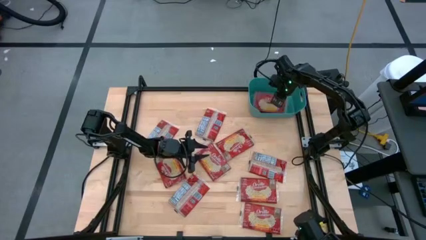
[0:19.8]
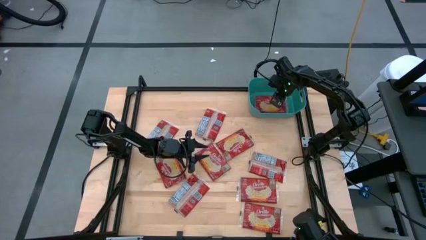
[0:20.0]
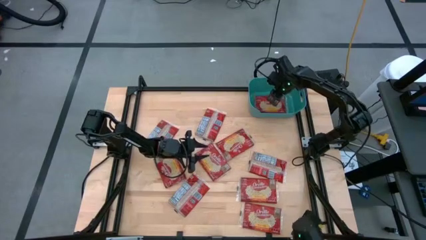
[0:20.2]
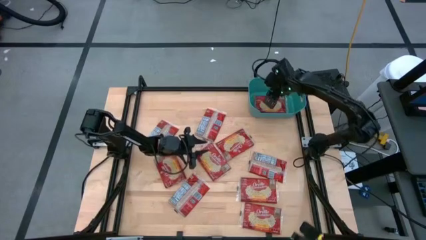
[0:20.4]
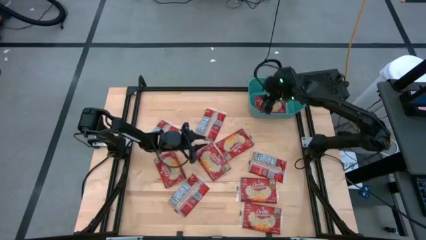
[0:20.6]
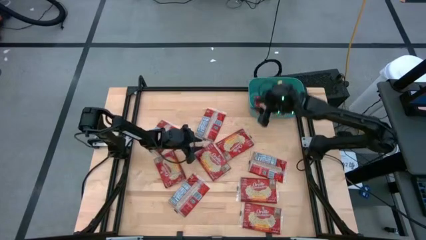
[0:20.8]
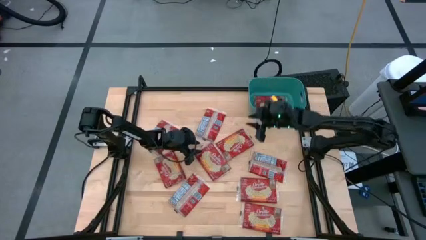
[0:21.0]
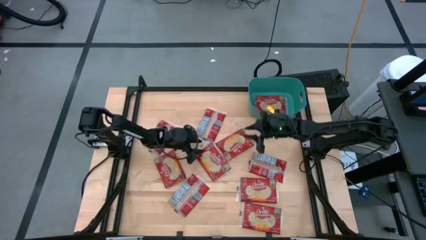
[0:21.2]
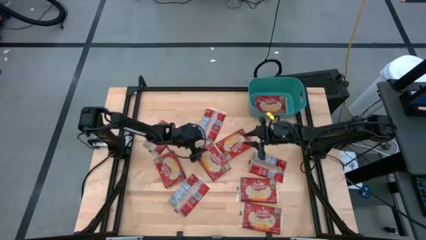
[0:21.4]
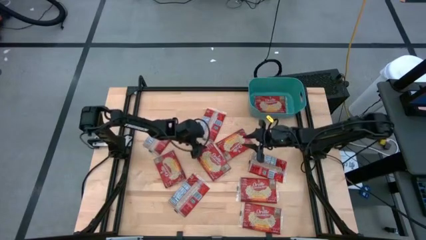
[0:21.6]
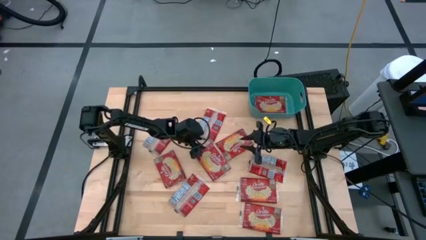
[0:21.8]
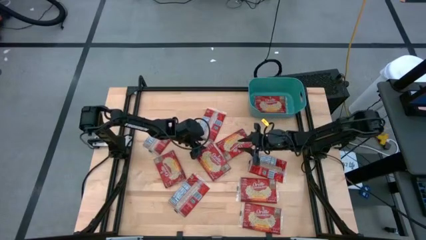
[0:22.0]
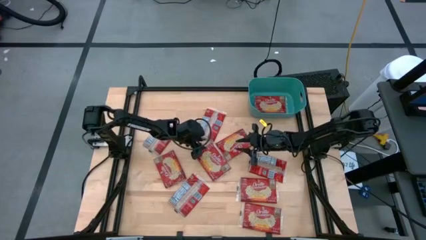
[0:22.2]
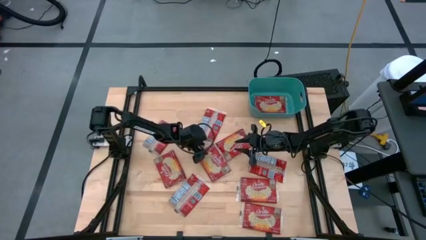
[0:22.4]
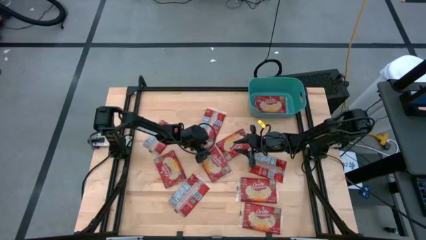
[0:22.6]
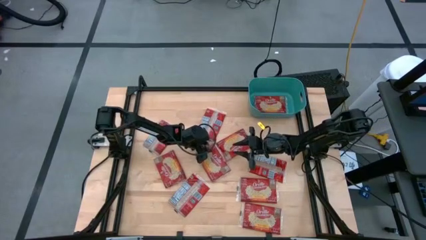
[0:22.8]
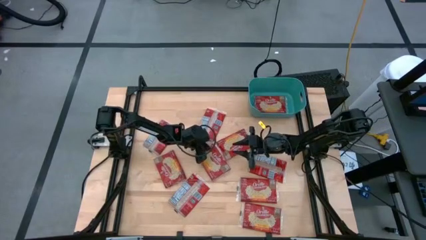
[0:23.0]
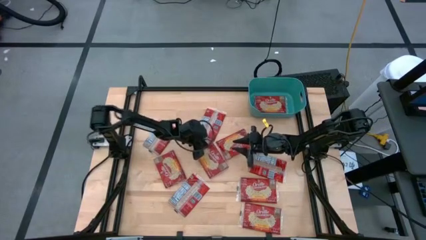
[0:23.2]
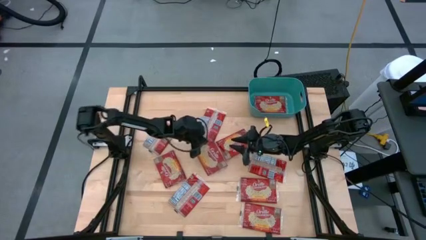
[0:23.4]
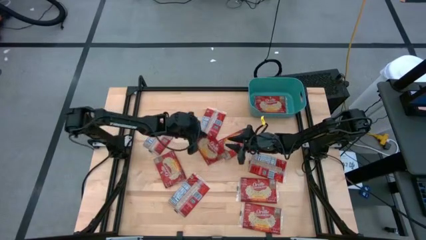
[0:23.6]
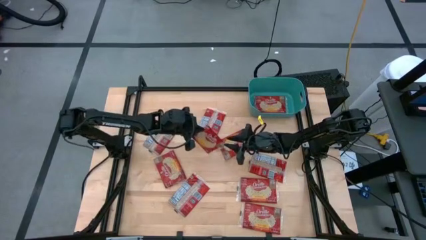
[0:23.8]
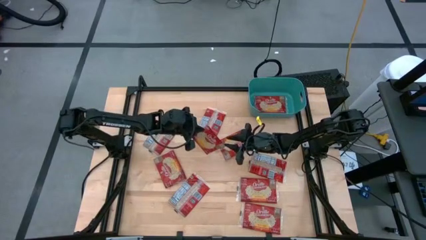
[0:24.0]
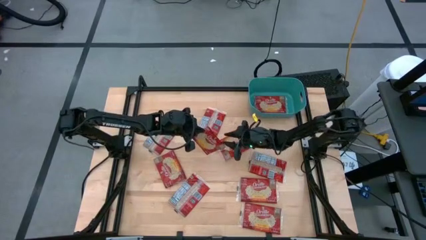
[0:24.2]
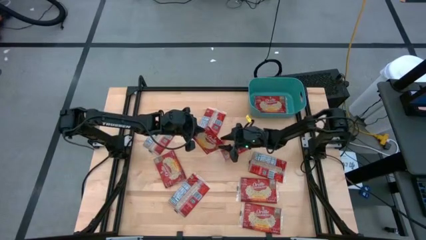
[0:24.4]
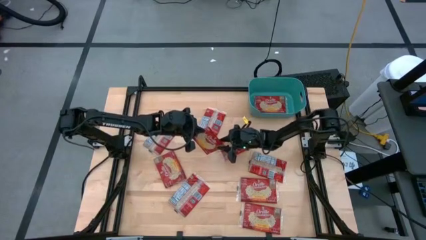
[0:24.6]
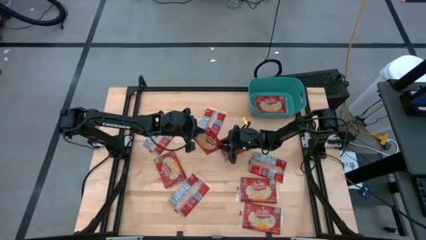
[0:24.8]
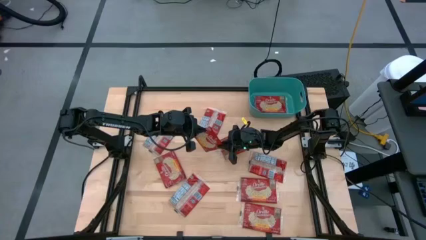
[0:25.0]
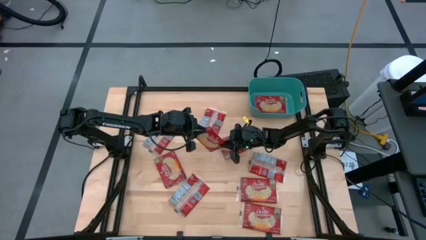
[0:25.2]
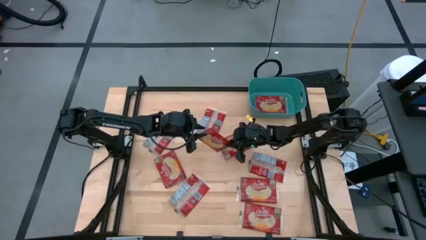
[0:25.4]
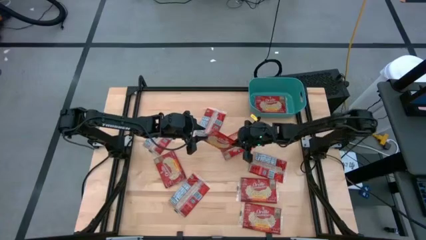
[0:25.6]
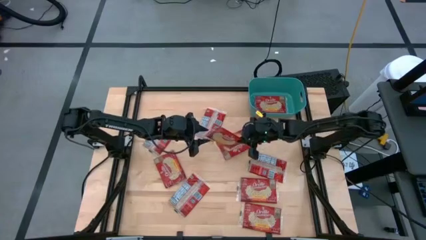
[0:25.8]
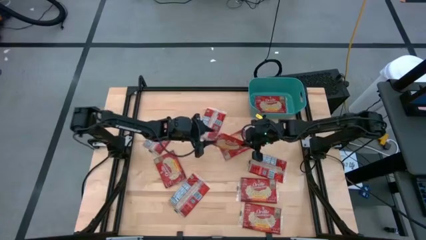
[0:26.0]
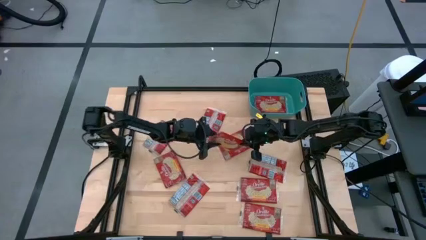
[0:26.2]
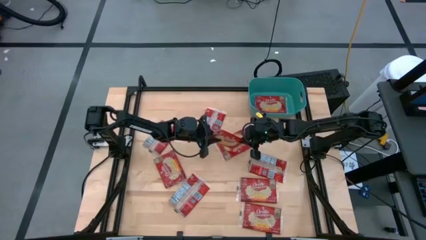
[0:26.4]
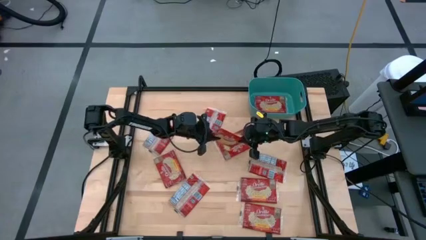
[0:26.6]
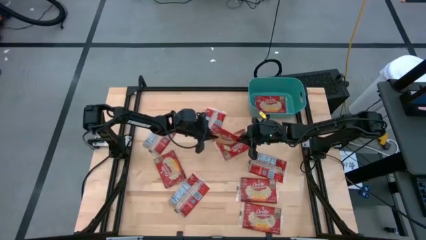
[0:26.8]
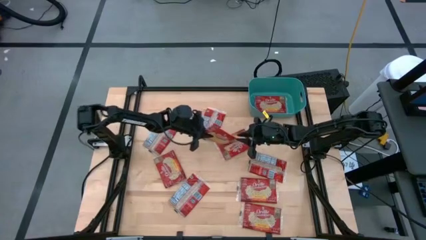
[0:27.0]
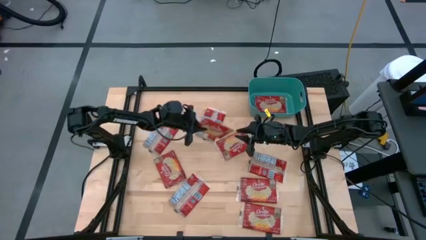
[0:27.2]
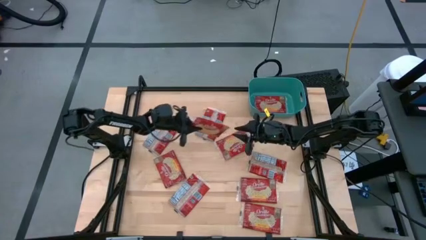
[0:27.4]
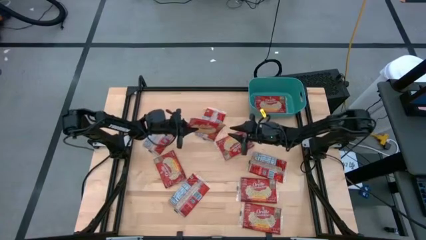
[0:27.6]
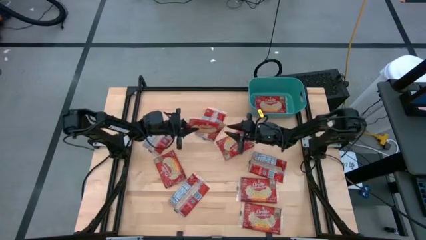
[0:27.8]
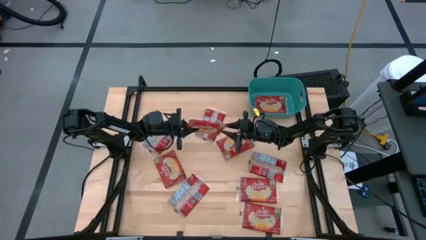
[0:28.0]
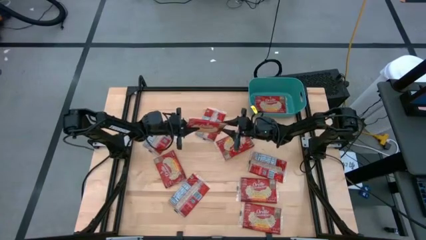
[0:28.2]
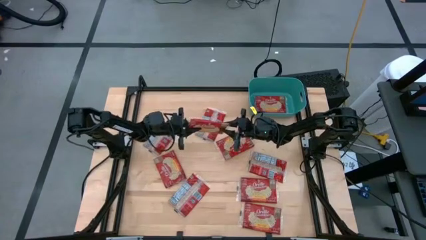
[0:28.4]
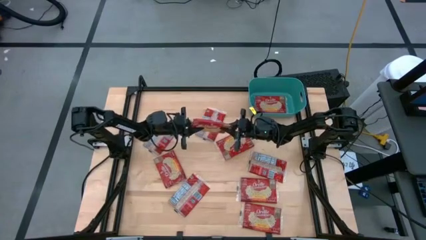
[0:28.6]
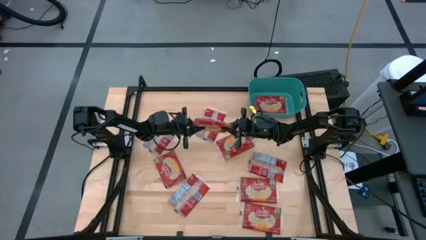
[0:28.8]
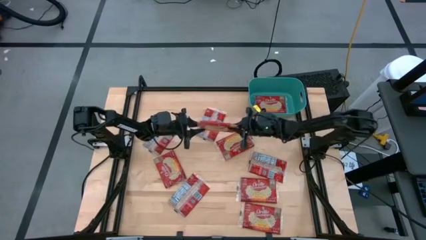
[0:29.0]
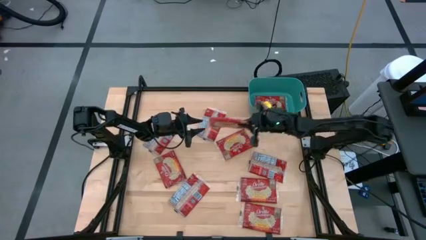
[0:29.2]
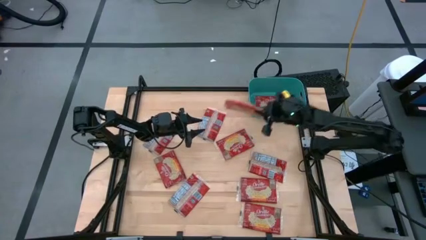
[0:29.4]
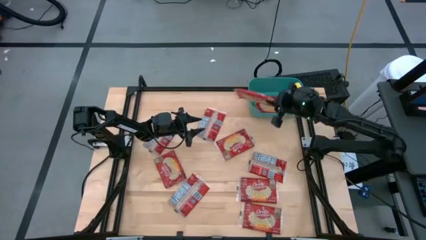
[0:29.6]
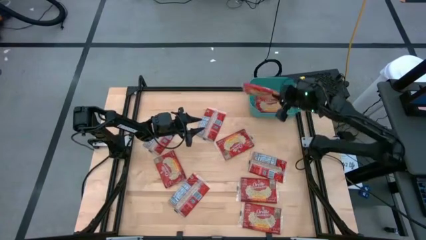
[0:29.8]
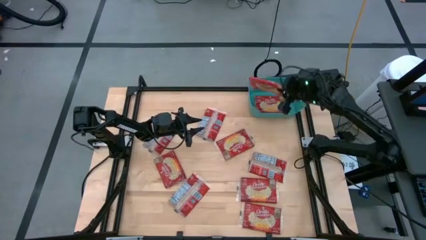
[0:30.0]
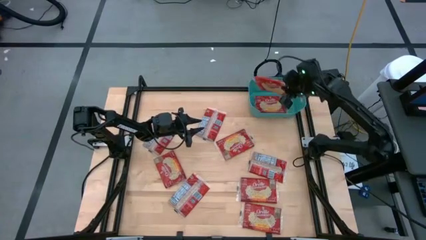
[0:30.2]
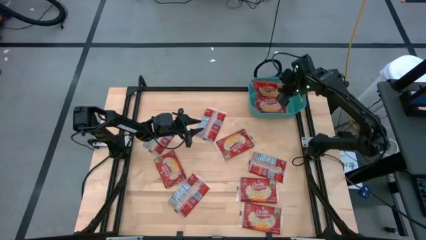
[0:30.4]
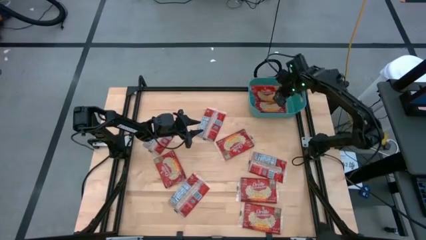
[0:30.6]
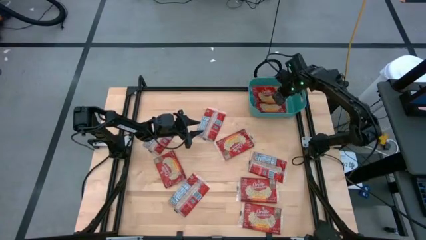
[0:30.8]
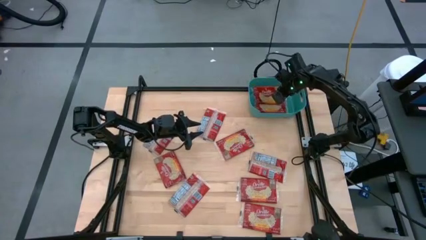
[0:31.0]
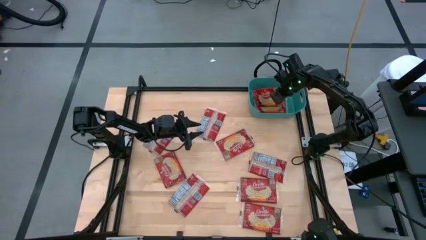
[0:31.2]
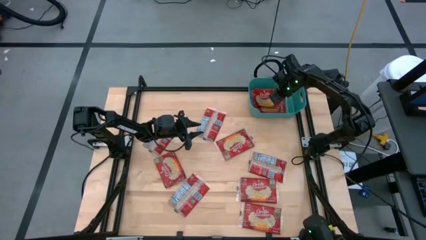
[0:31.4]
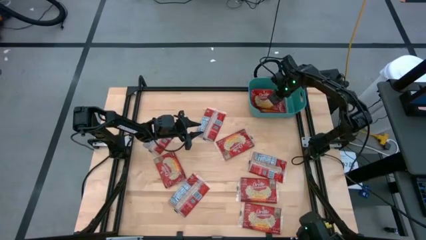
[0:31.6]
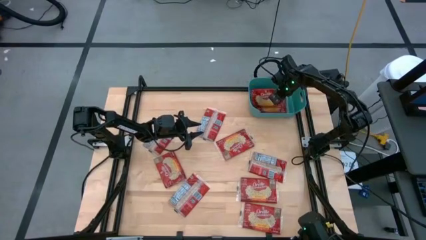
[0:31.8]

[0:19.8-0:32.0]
Task: Sort popcorn bags into baskets
Put the red popcorn bag into the blue bin

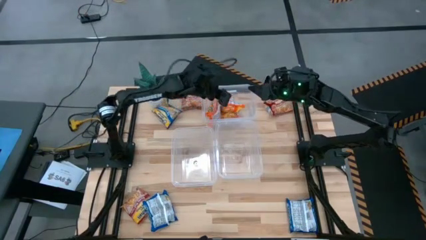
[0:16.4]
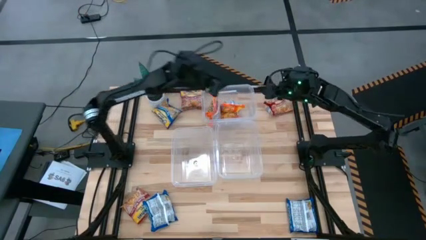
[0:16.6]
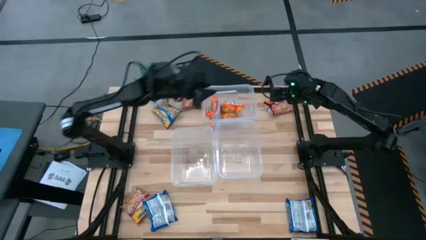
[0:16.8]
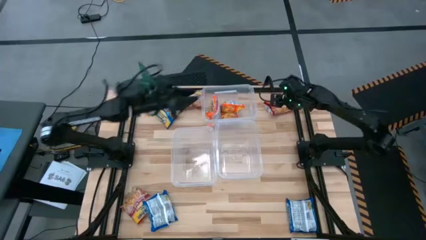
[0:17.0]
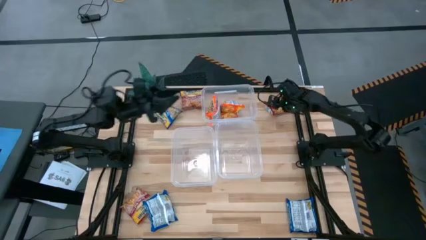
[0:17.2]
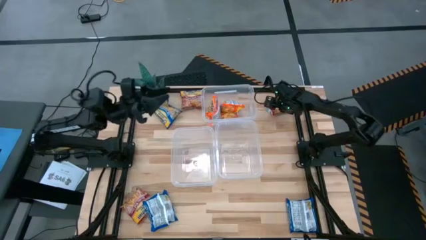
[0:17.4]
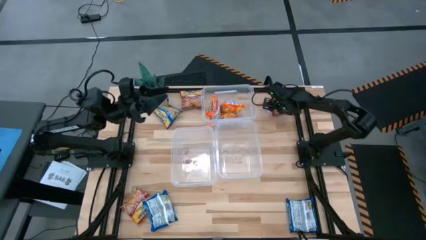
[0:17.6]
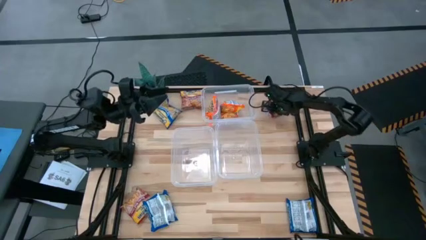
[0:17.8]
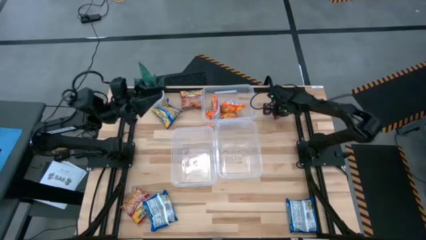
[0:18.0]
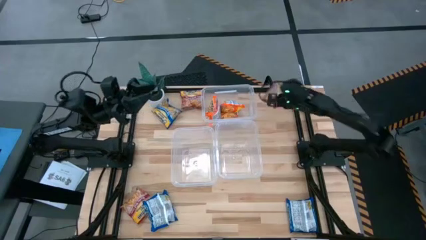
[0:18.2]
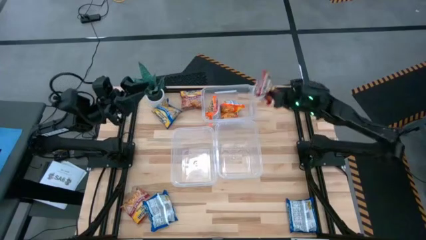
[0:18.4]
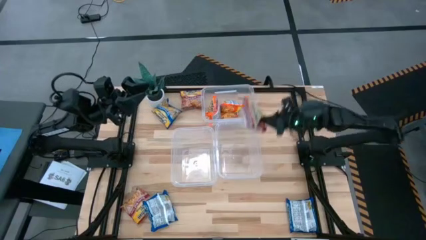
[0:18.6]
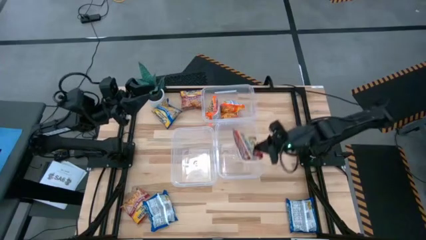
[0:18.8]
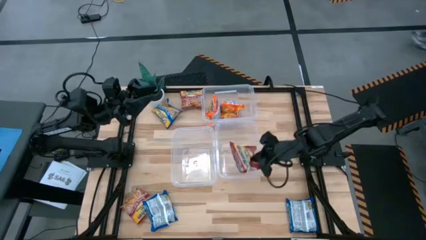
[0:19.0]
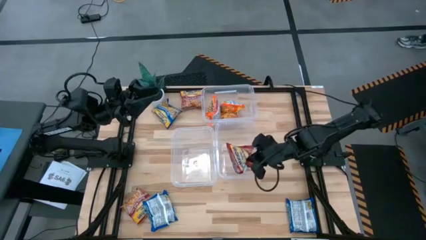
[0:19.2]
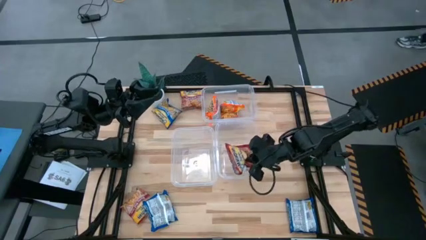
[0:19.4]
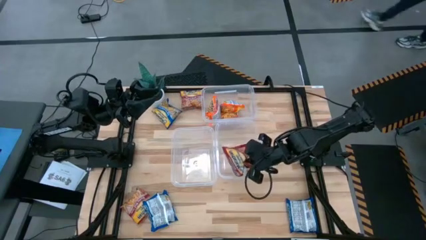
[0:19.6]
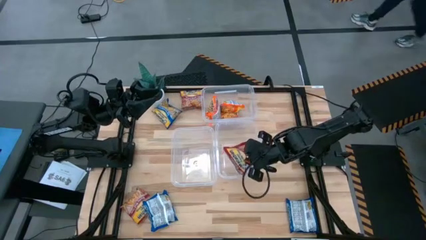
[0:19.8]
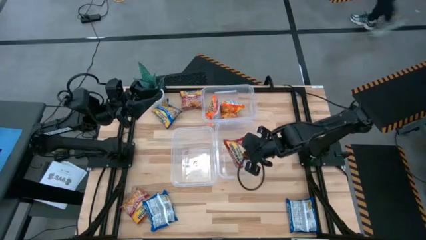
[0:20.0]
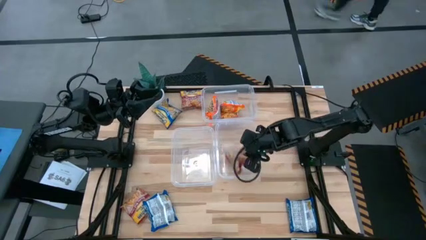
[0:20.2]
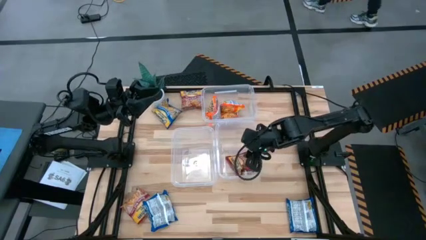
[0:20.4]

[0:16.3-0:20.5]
Task: Sort Maruchan noodles
Put the top right red noodle pack into the bottom right transparent bin
